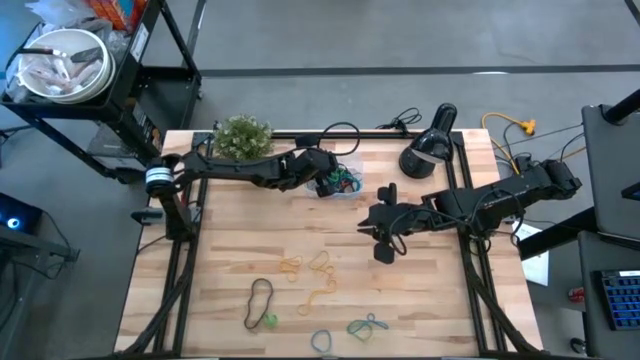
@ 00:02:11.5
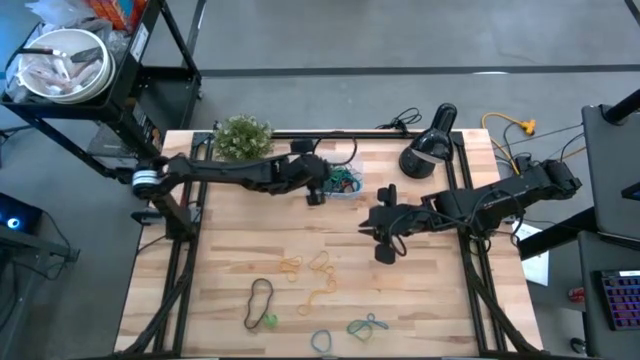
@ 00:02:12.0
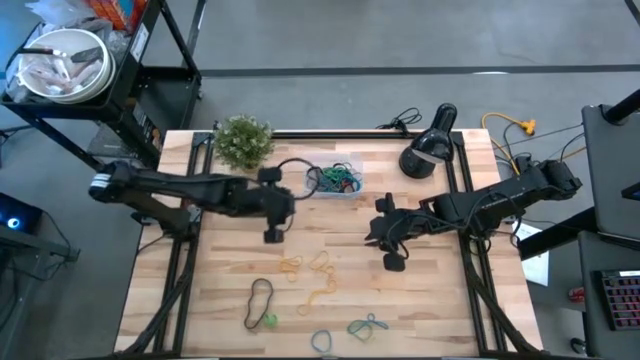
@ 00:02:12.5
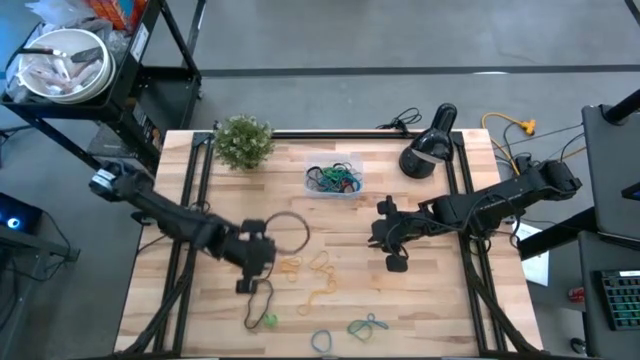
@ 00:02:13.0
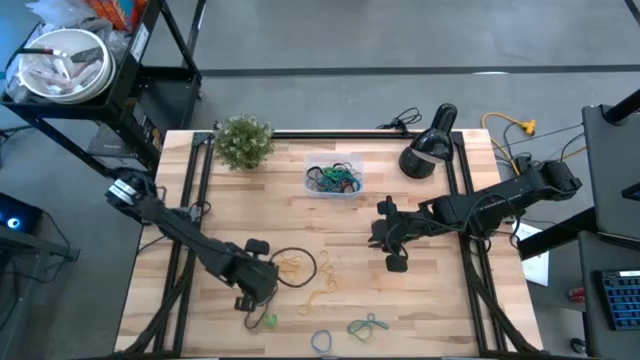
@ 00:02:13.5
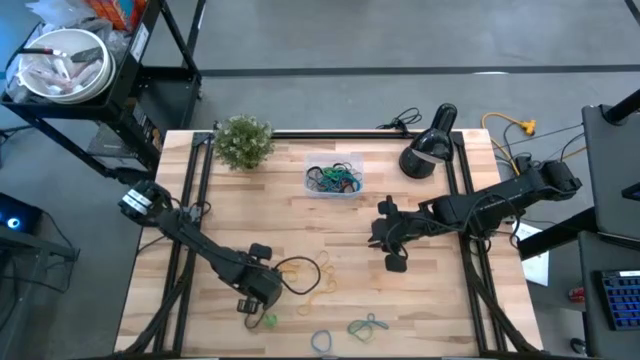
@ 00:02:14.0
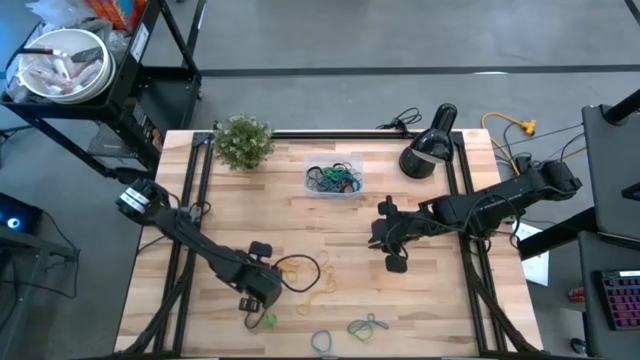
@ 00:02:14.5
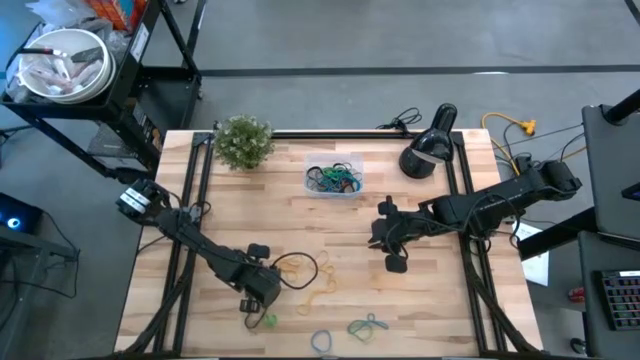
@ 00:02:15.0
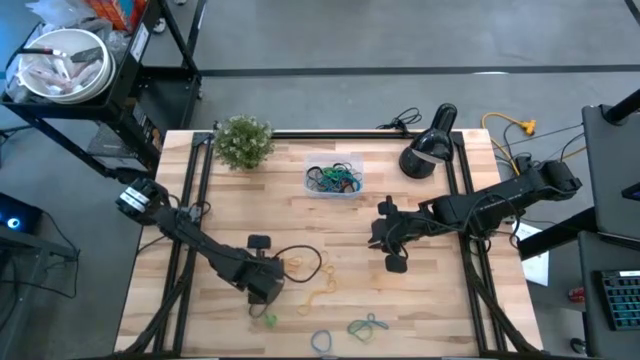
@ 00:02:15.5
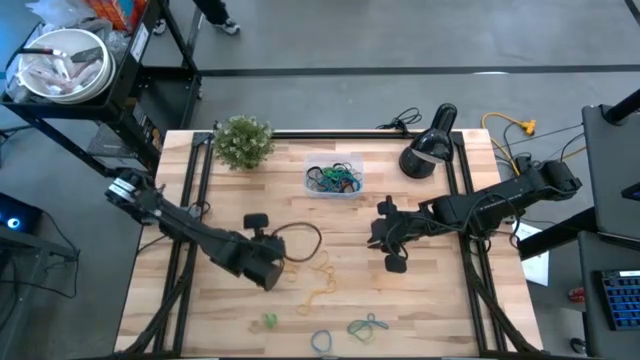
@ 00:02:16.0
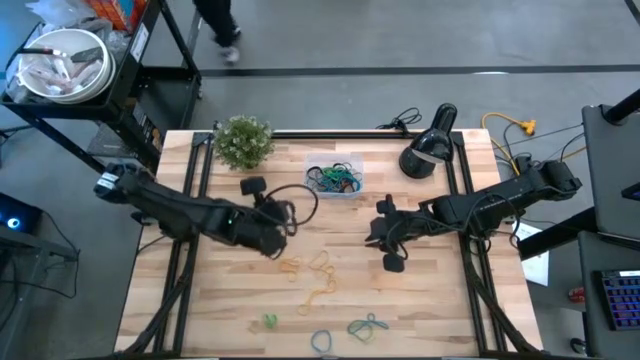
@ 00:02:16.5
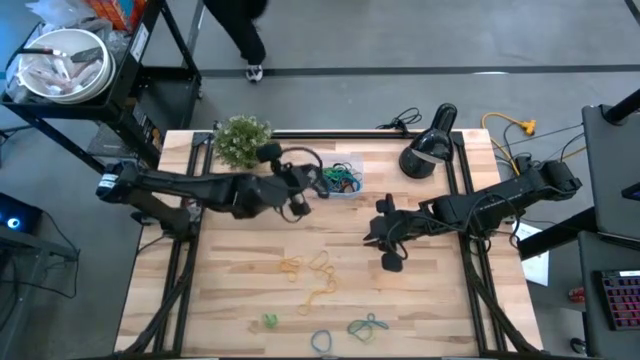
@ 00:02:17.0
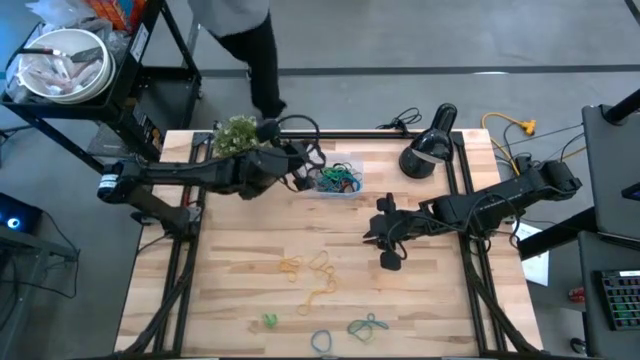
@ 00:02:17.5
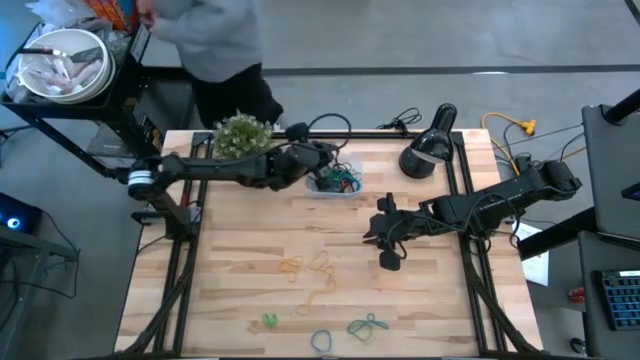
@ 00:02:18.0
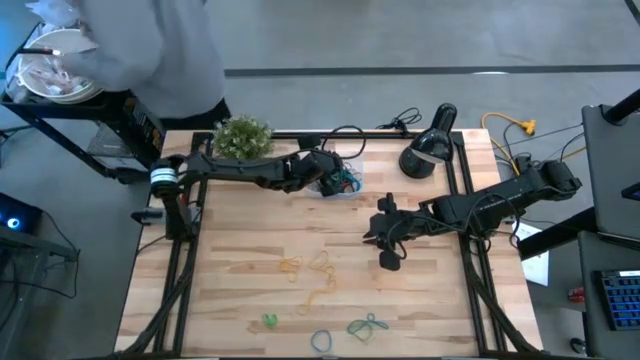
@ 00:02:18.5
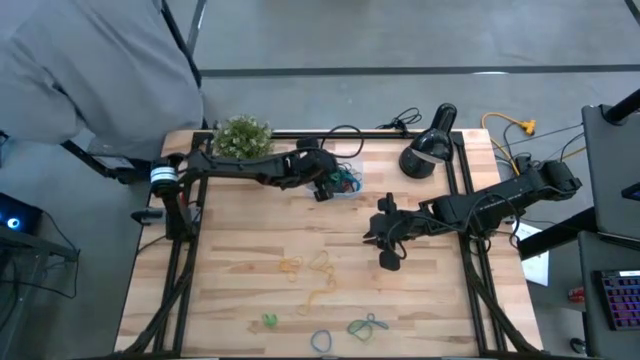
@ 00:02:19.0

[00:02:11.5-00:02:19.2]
Task: Pick and place rubber bands into bin
Put the black rubberband into the transparent bin

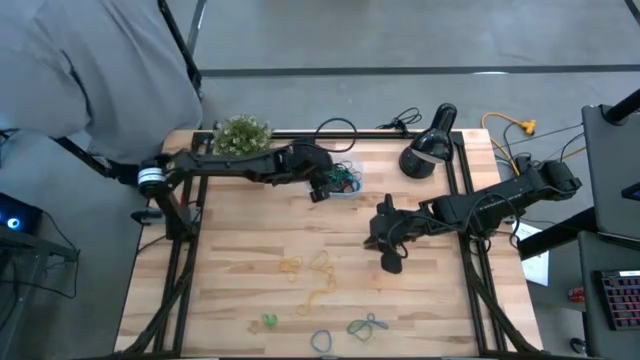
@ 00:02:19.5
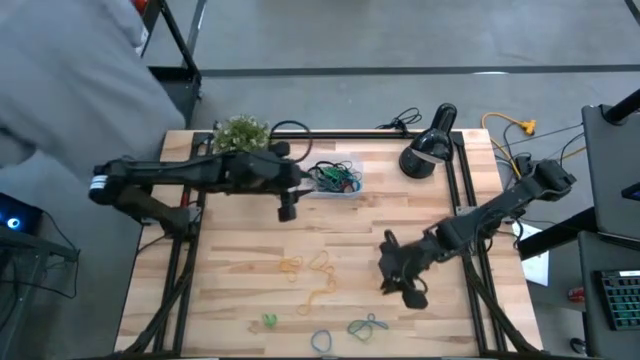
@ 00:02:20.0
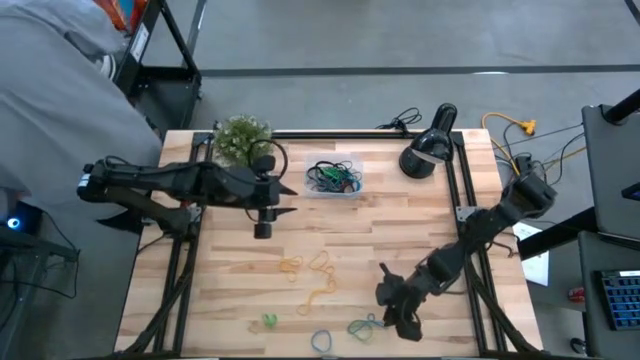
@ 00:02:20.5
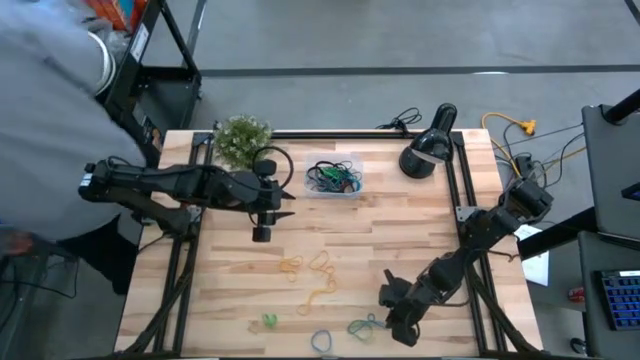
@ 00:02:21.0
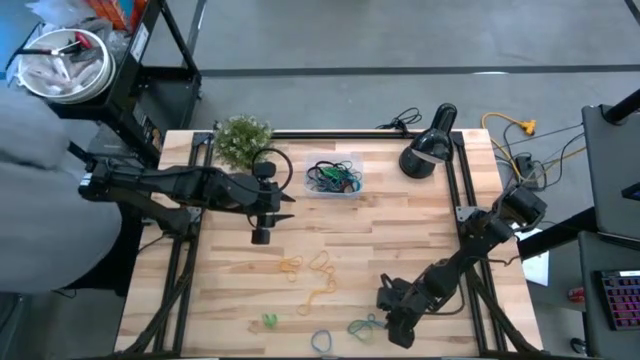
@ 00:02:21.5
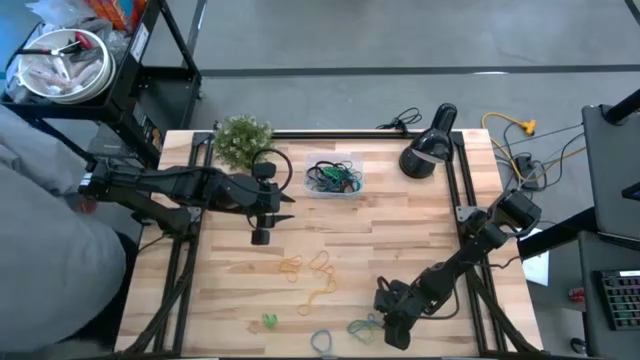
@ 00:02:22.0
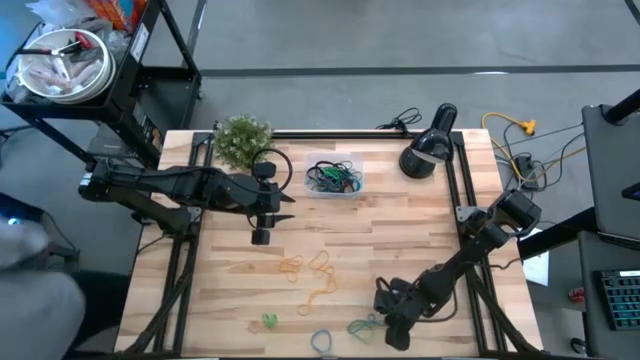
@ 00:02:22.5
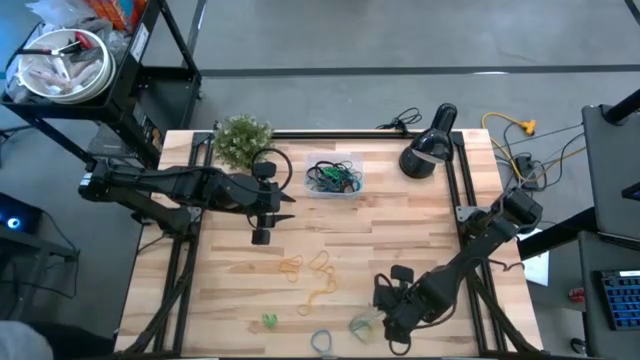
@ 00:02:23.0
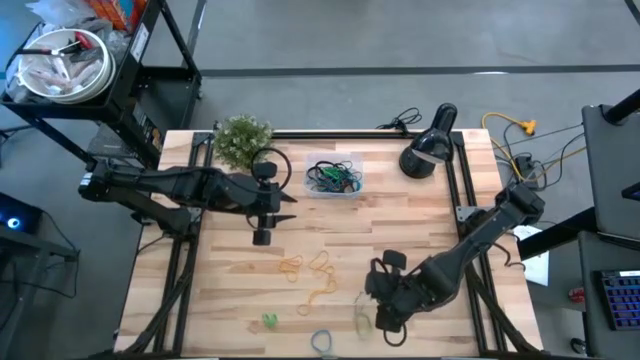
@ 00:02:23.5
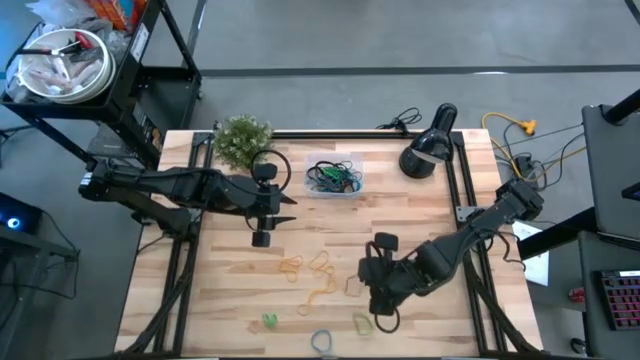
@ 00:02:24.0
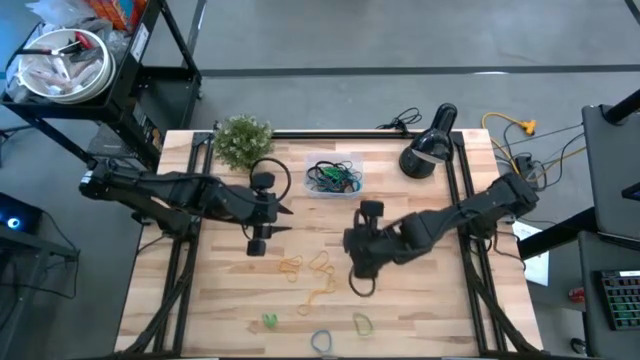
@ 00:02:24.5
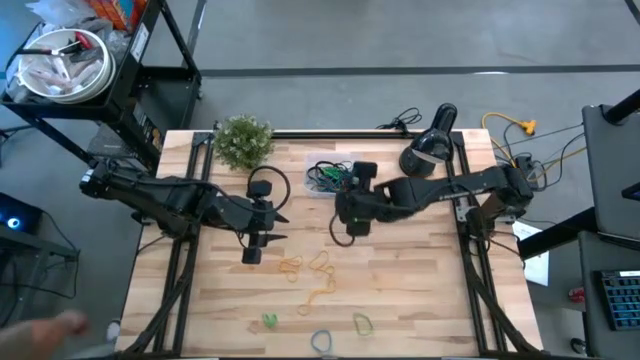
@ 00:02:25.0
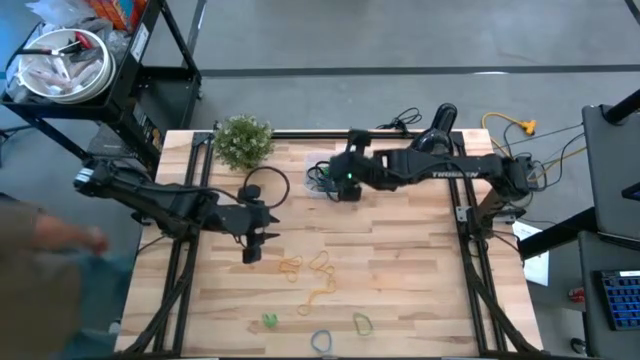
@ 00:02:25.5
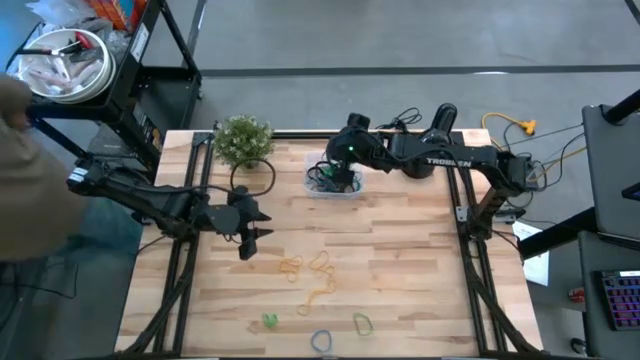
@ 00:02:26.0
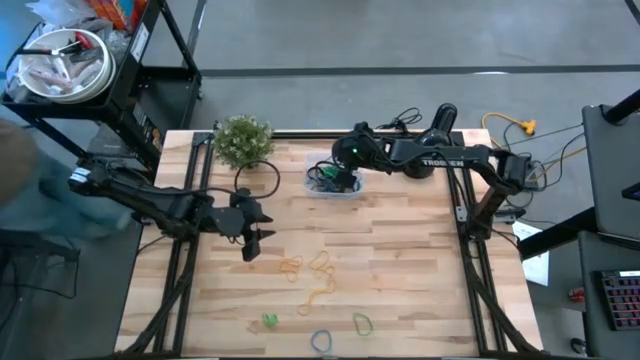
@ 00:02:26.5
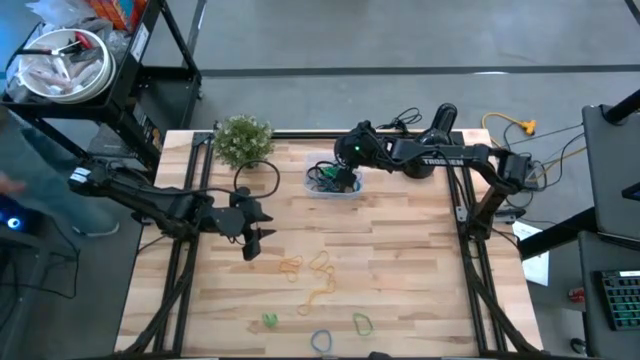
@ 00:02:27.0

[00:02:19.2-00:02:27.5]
Put the blue rubberband into the transparent bin

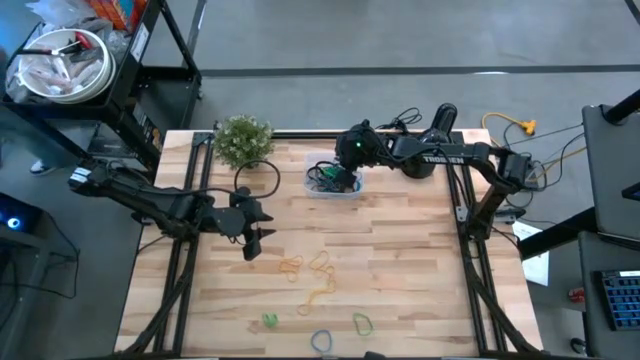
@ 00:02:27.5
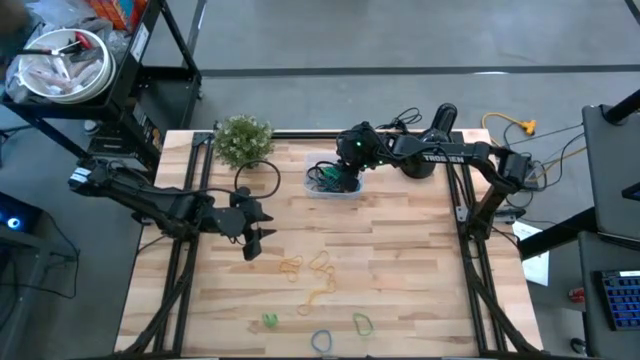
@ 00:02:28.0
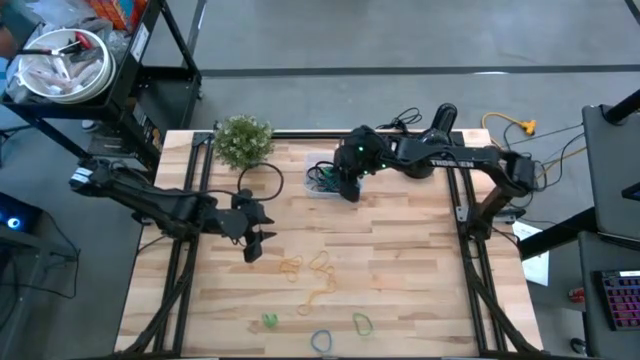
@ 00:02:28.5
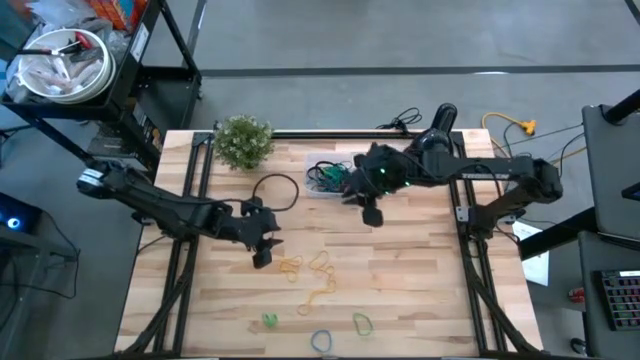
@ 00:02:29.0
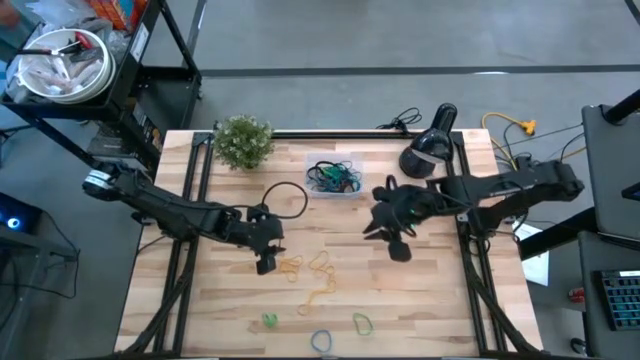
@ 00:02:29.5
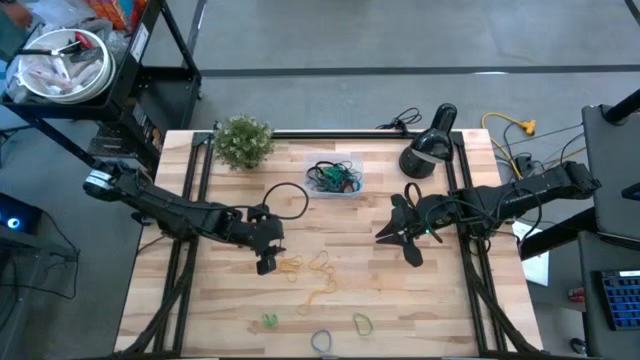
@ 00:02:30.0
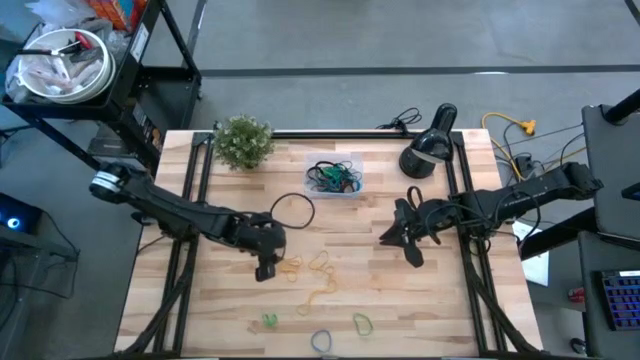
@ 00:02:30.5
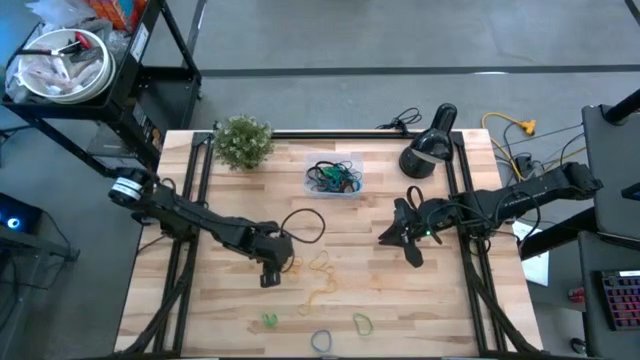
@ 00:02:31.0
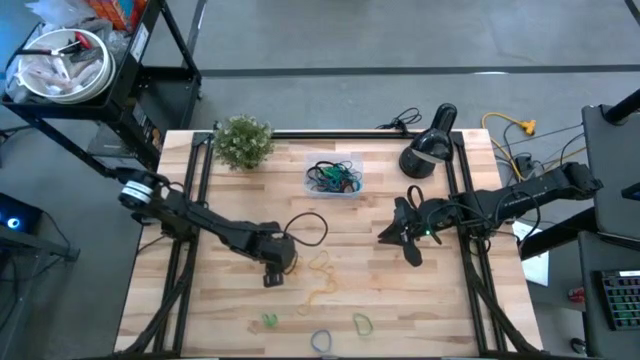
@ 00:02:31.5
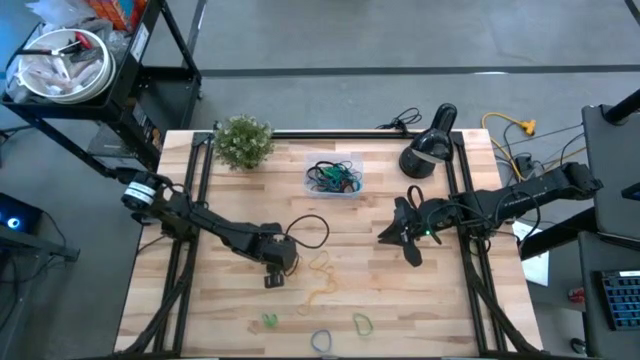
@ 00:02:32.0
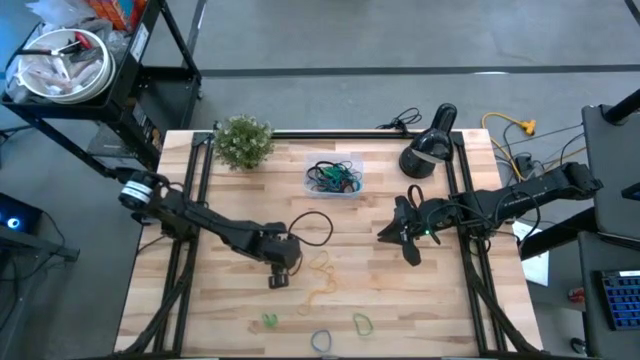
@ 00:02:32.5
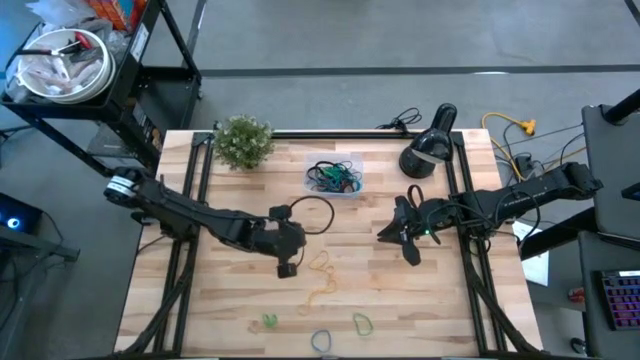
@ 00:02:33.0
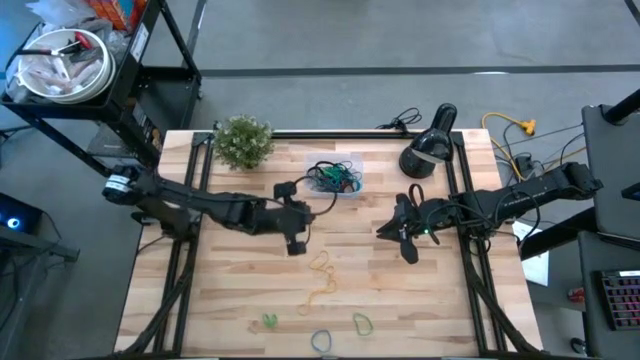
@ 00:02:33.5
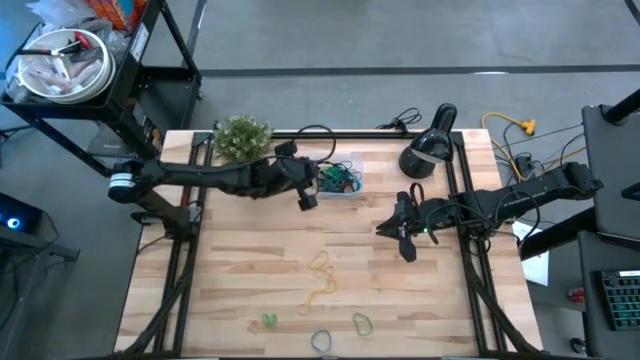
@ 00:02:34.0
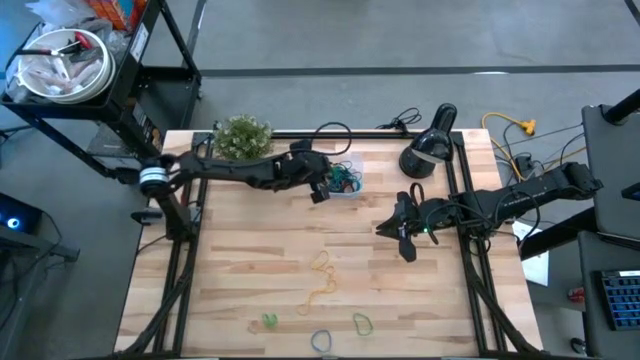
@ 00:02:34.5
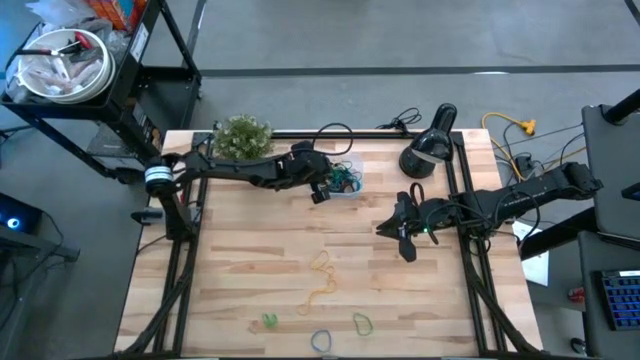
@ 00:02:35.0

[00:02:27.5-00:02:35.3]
Put the yellow rubberband into the transparent bin
